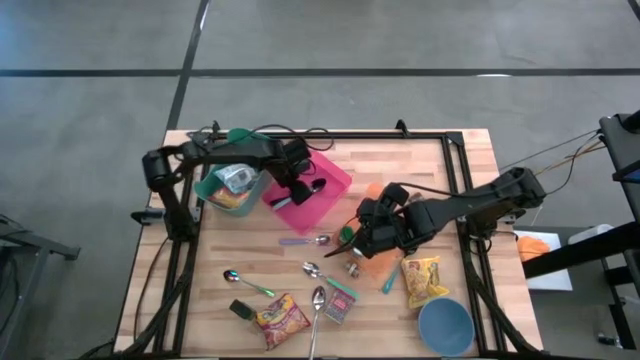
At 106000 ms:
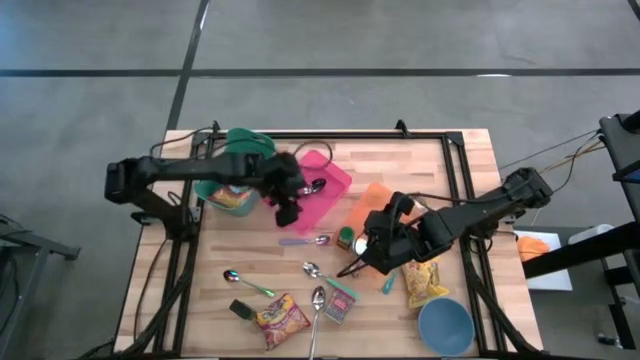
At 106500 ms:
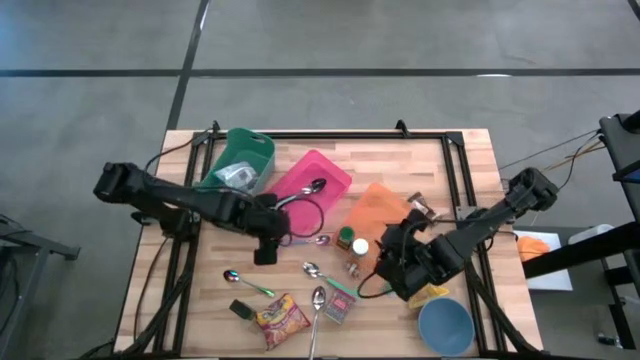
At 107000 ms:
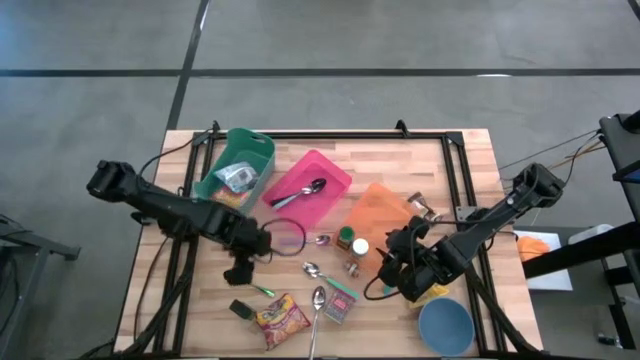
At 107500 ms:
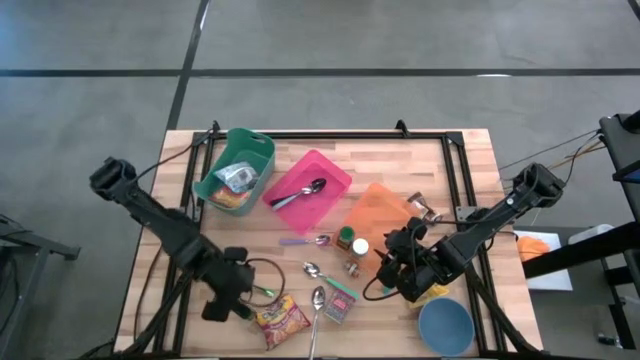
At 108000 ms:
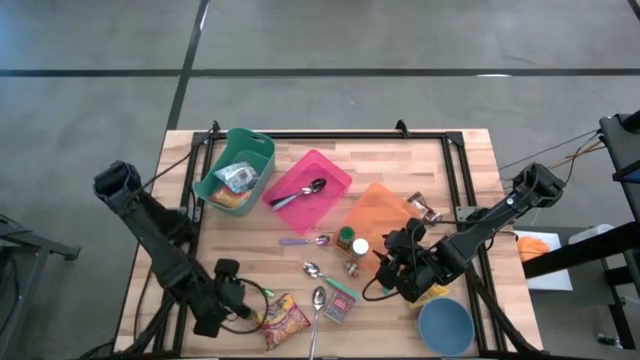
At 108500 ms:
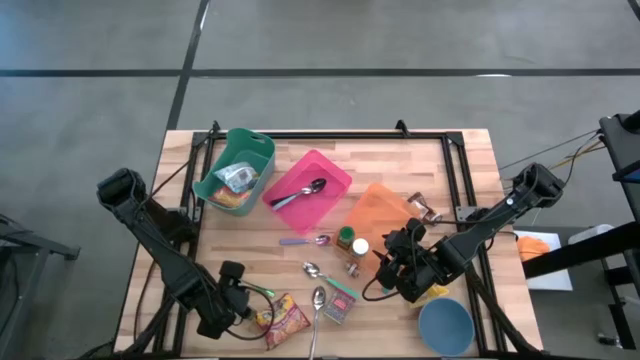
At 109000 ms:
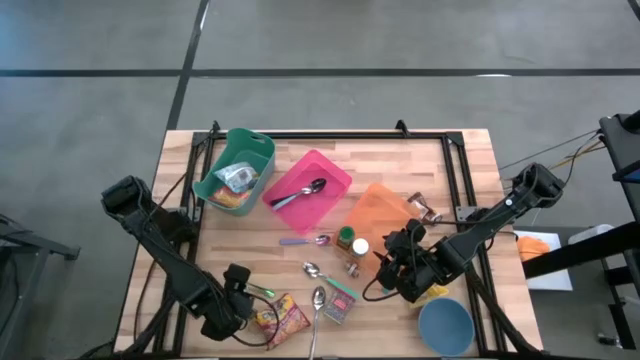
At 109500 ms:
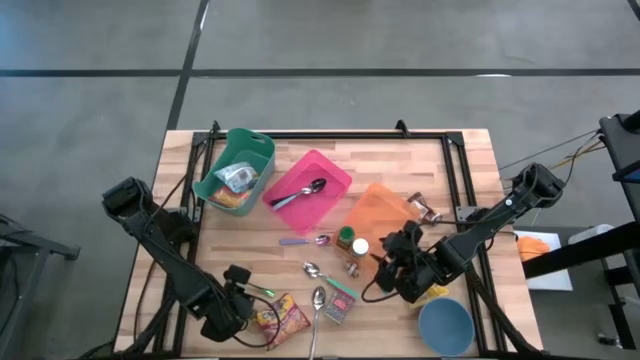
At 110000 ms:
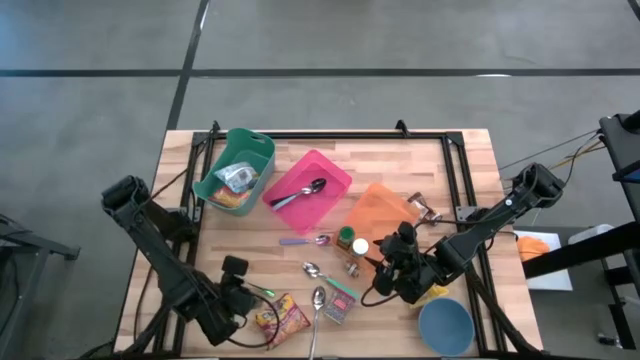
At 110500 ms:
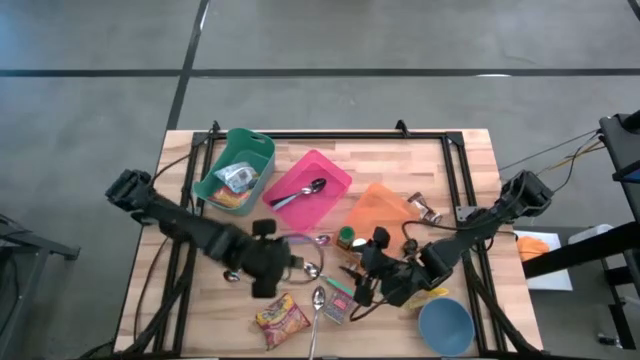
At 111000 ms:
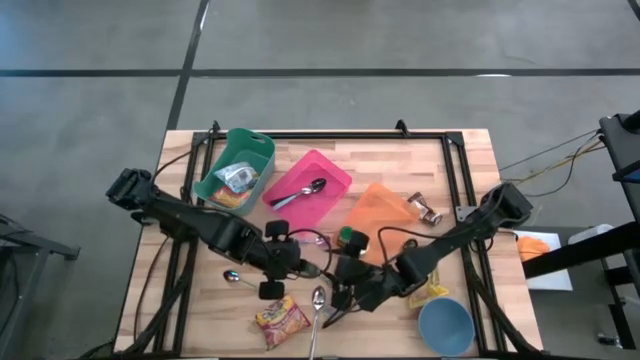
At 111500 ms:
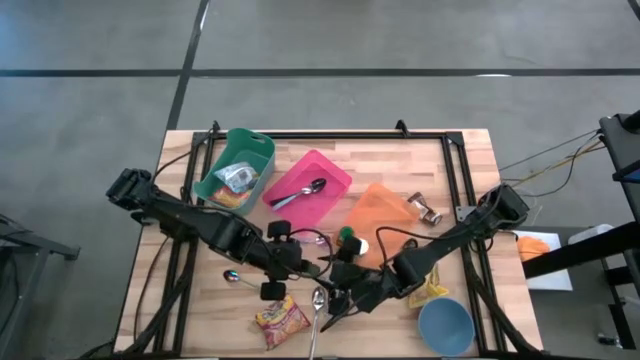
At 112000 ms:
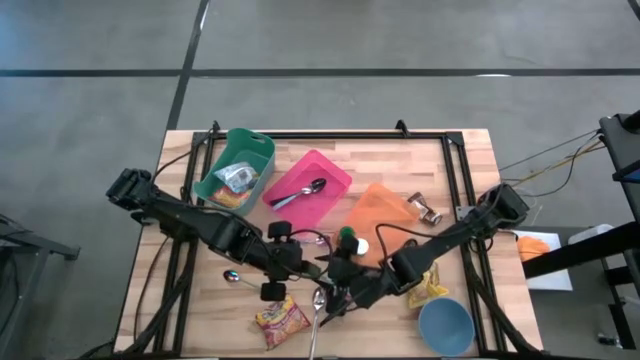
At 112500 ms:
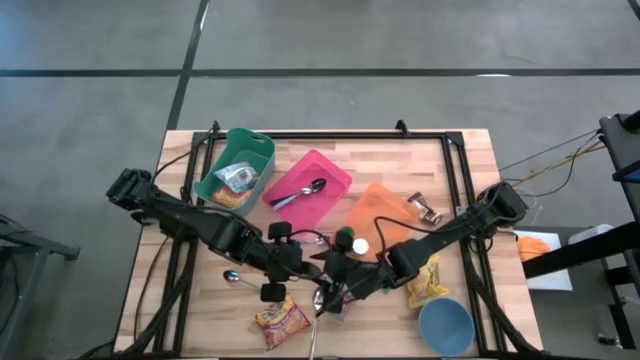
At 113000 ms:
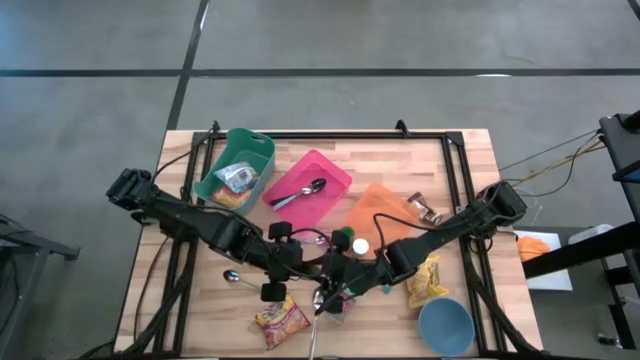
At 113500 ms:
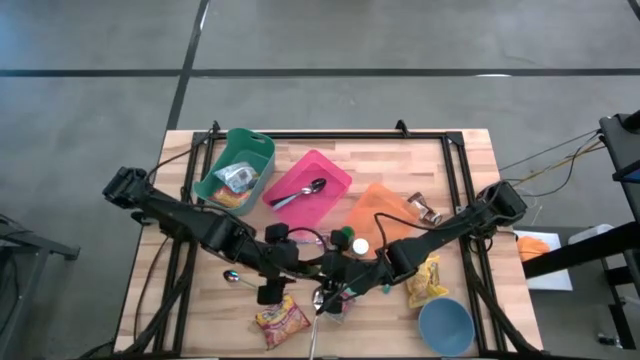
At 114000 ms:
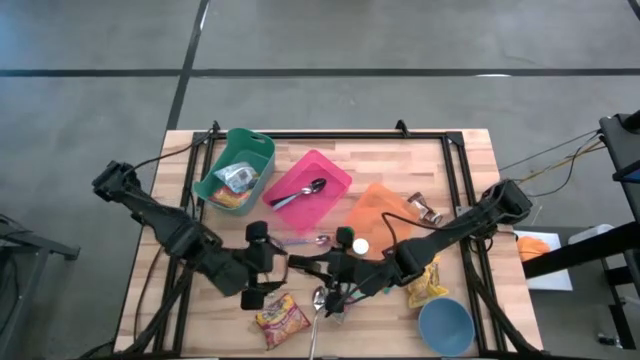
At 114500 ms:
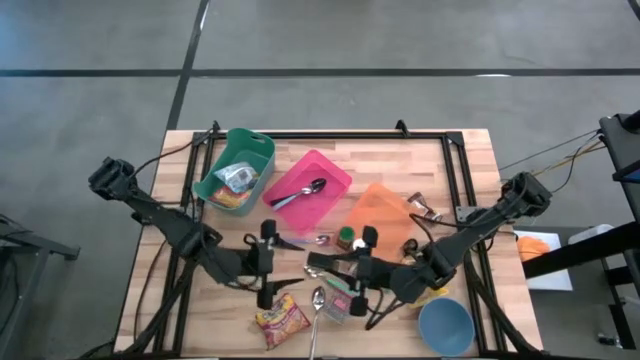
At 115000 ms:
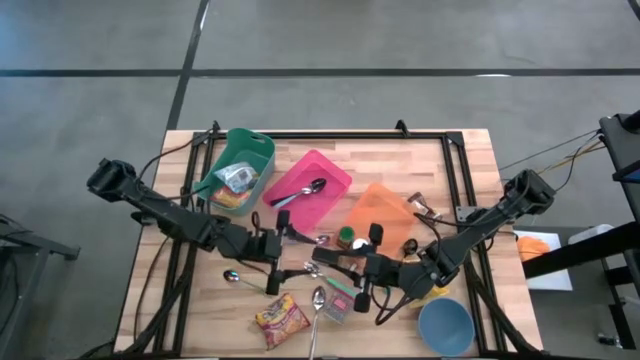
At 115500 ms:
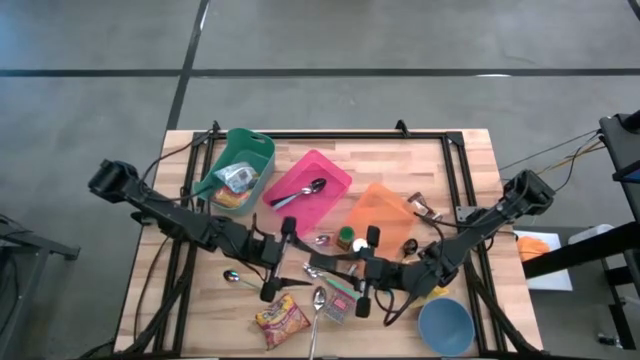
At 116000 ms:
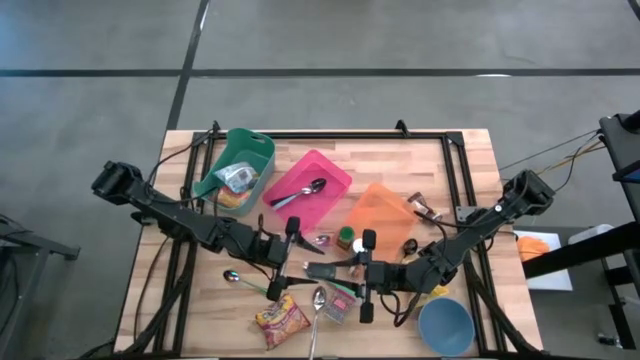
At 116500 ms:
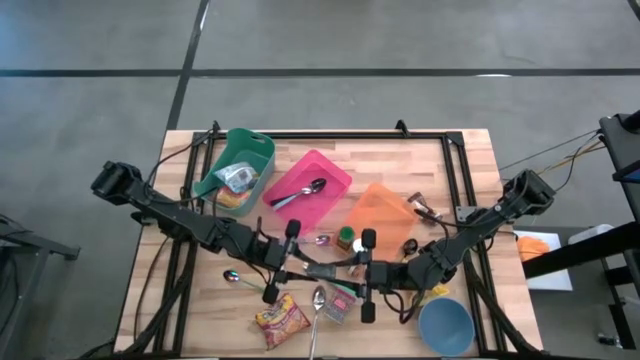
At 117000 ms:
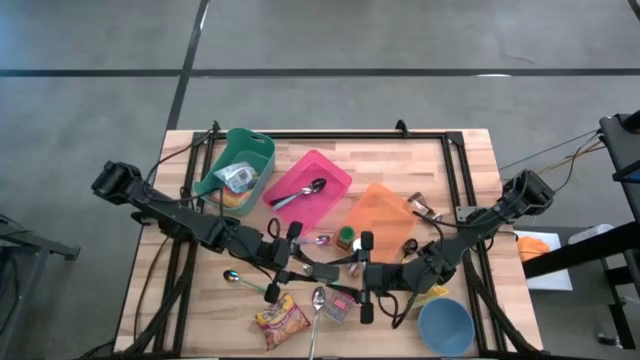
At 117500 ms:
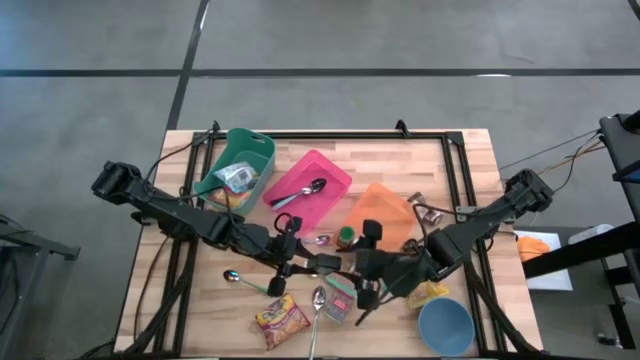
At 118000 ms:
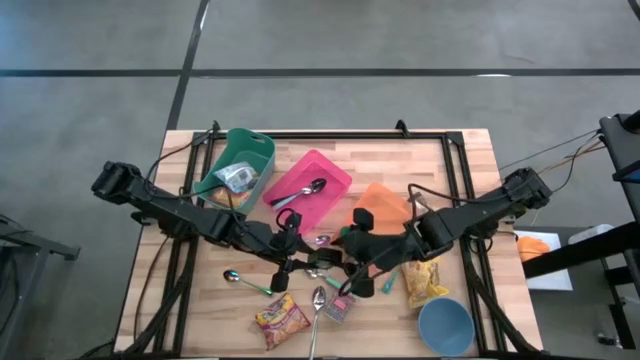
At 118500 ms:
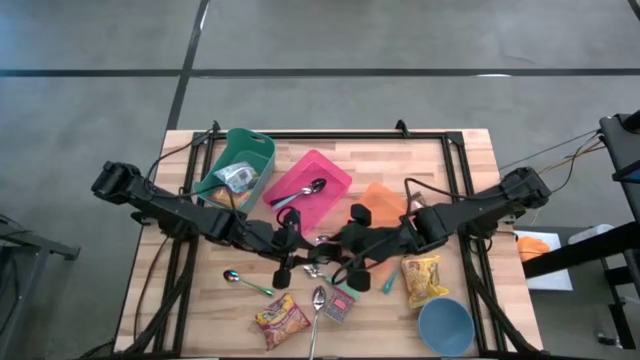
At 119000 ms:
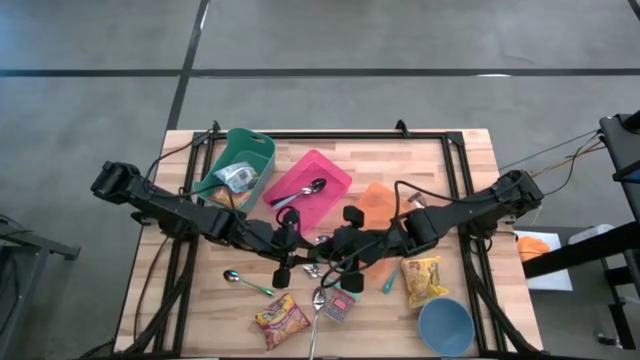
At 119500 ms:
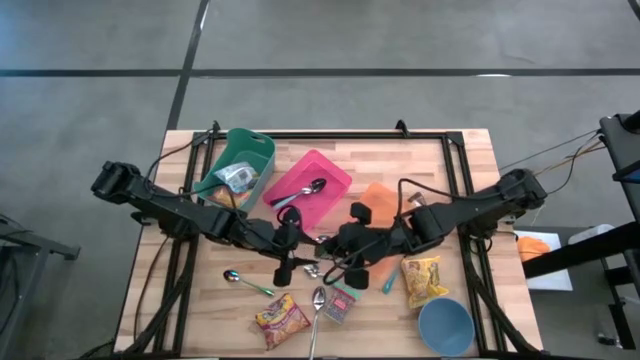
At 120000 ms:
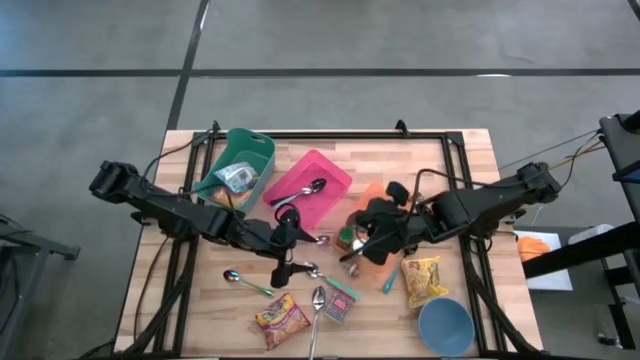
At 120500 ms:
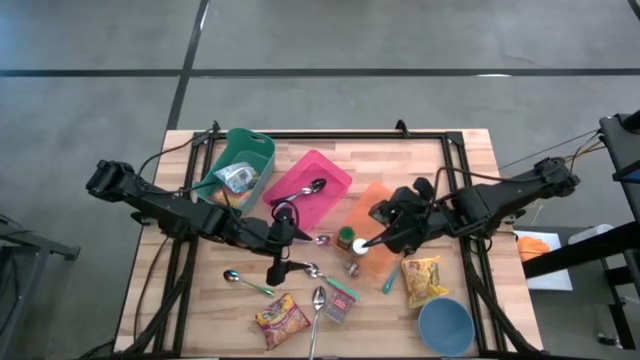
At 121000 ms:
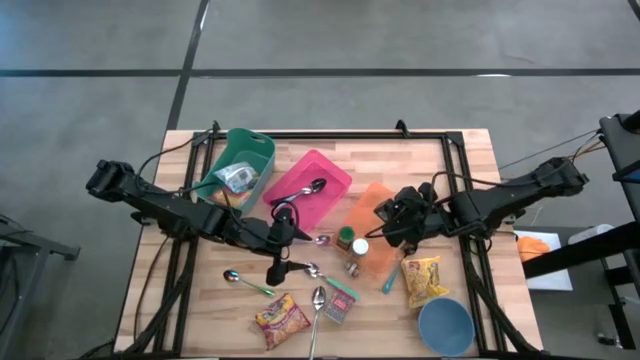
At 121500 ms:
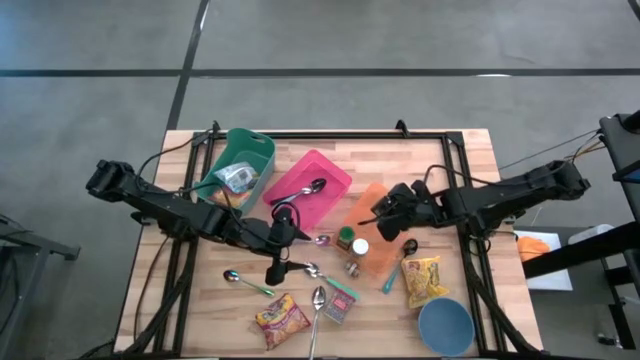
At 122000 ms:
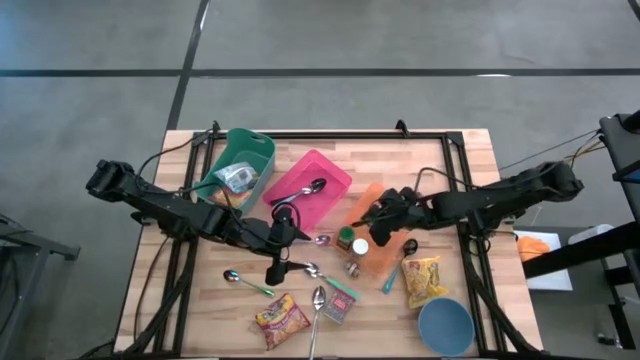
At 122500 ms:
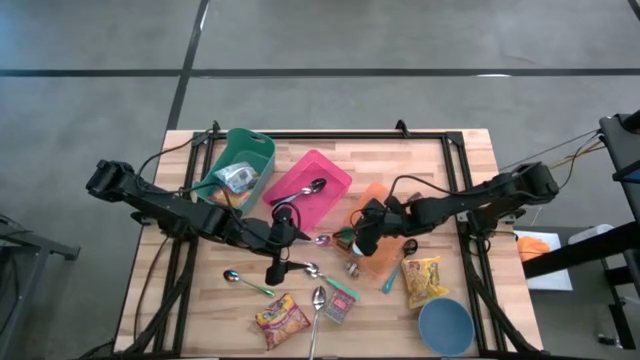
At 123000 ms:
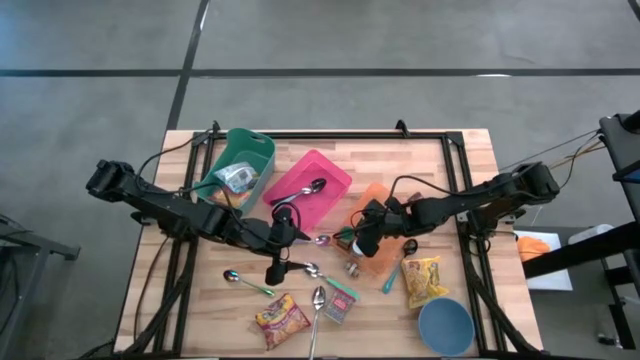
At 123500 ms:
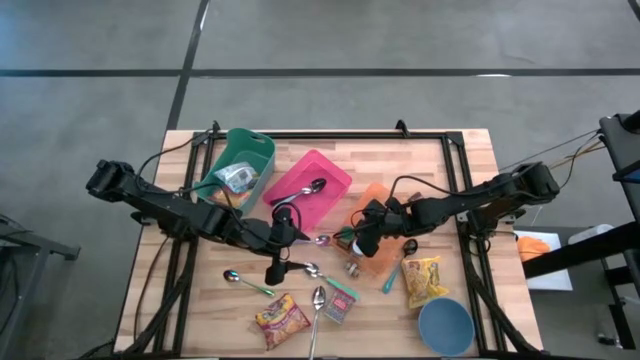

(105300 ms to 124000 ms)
Put the black seasoning can into the orange bin

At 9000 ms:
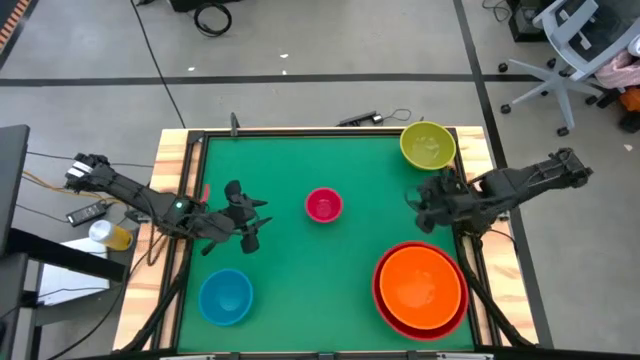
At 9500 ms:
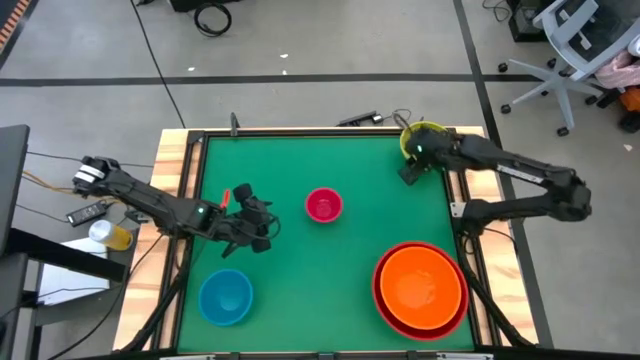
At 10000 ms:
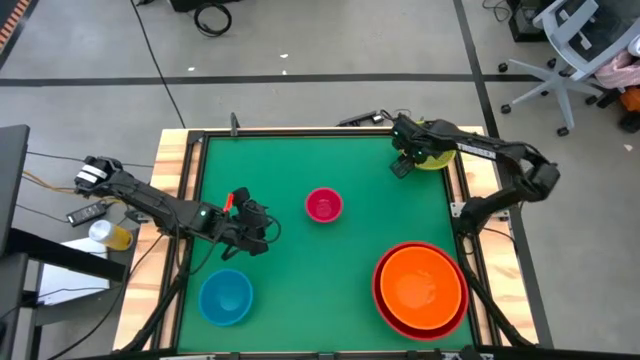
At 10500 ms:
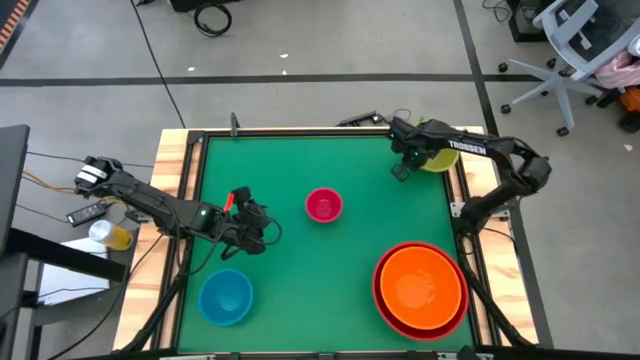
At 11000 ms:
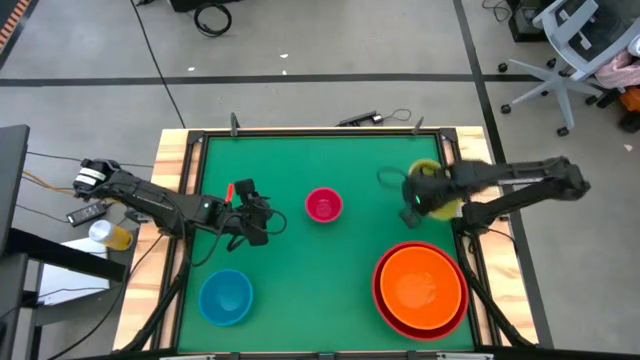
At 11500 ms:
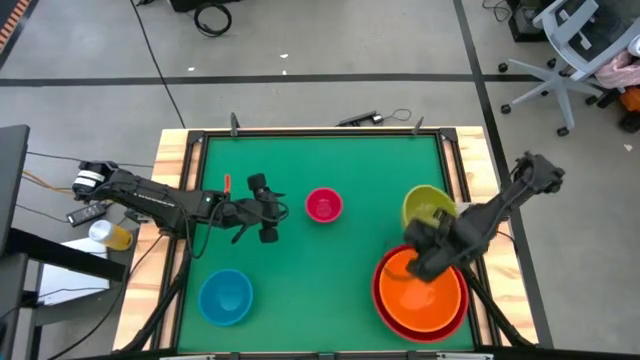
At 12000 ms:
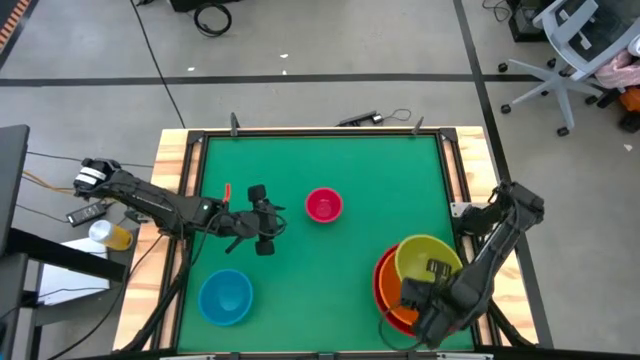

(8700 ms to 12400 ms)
Stack the green bowl on top of the orange bowl
